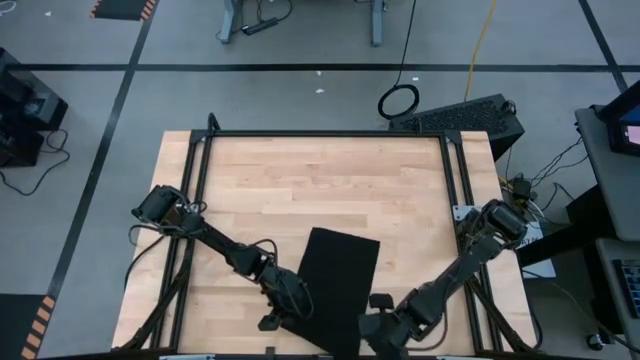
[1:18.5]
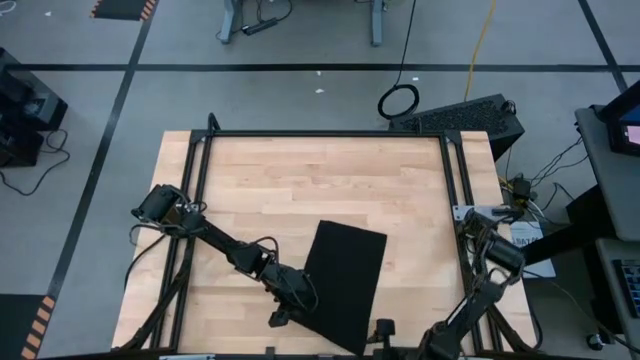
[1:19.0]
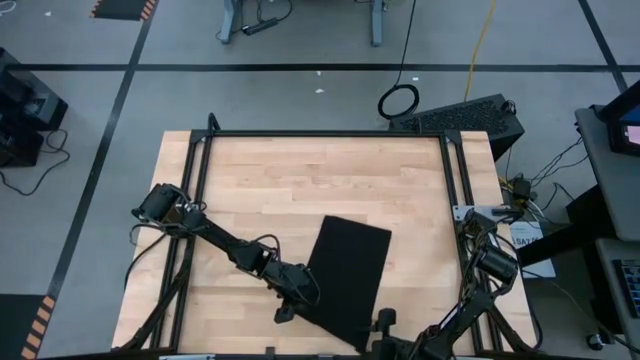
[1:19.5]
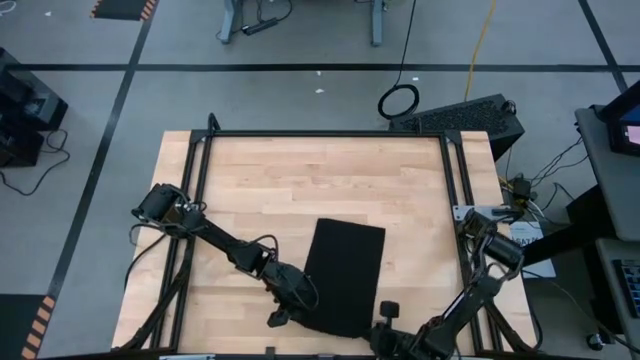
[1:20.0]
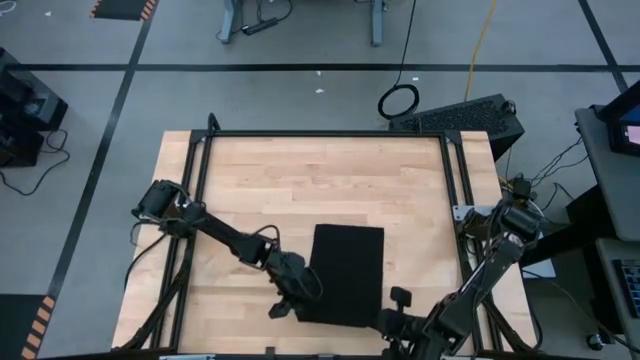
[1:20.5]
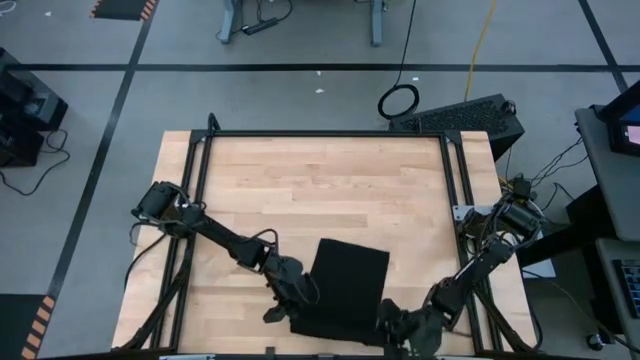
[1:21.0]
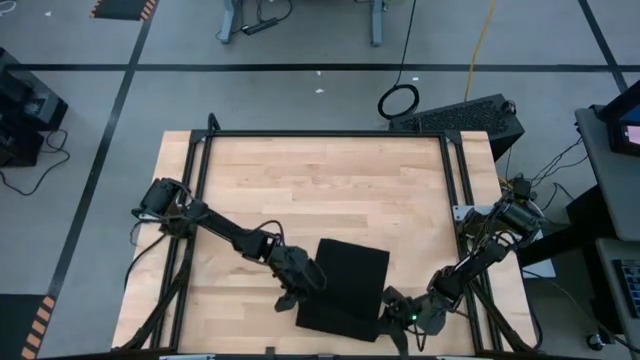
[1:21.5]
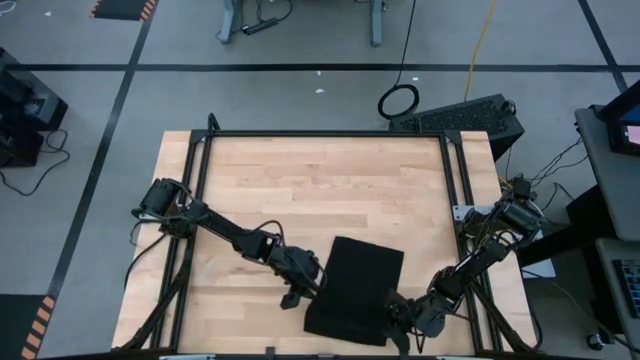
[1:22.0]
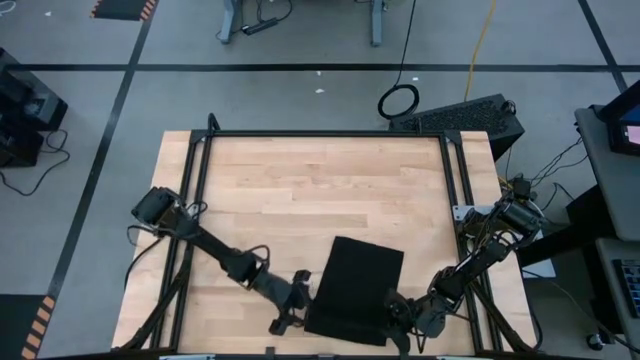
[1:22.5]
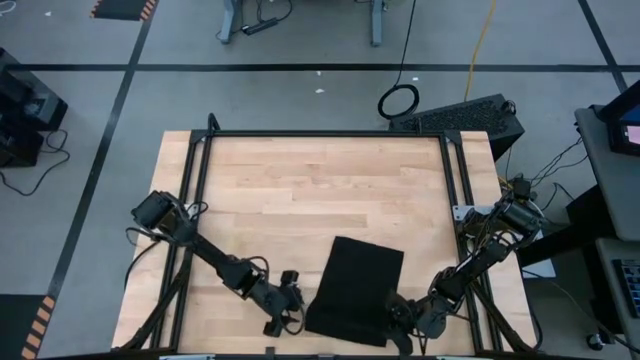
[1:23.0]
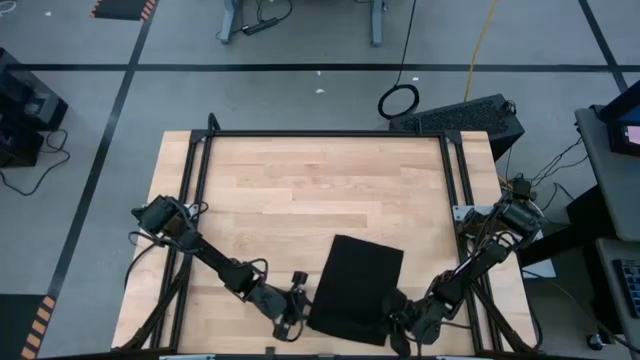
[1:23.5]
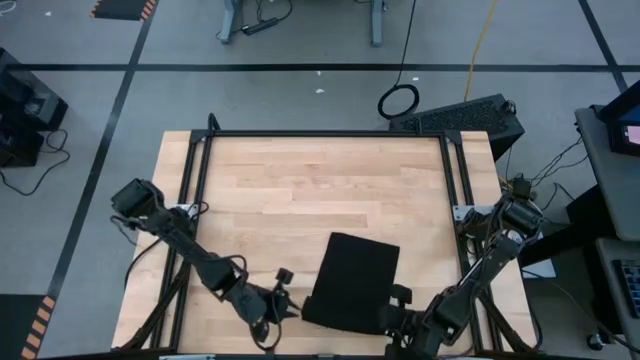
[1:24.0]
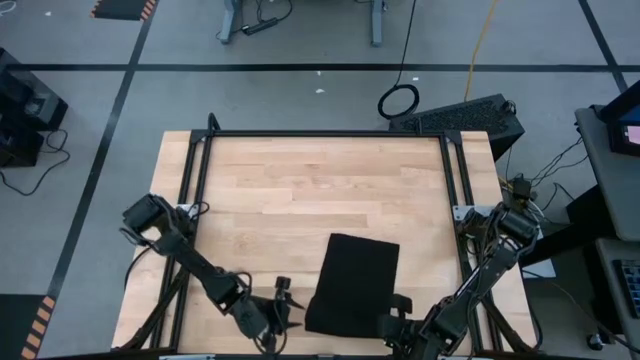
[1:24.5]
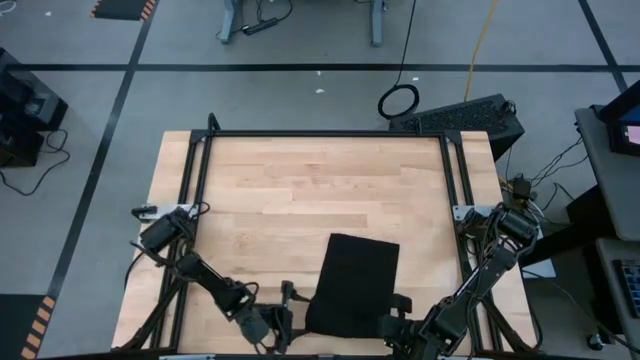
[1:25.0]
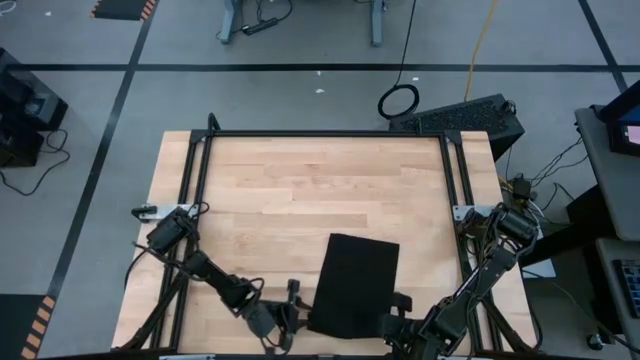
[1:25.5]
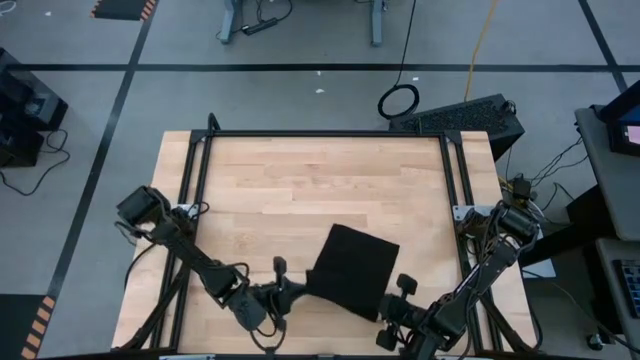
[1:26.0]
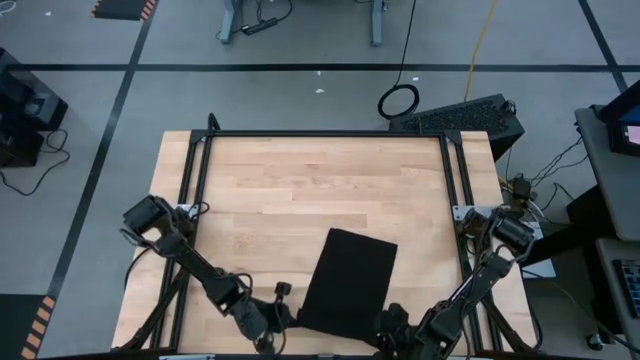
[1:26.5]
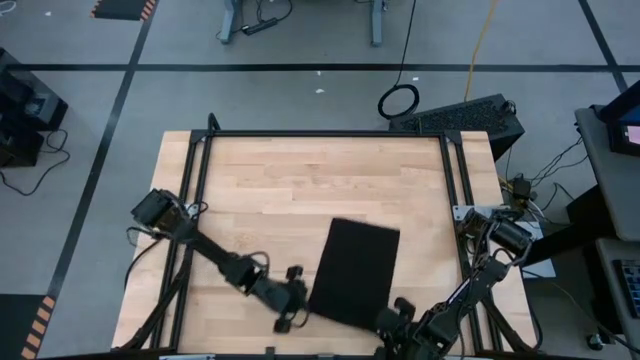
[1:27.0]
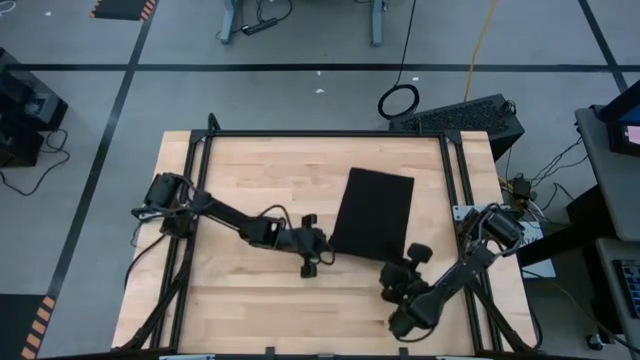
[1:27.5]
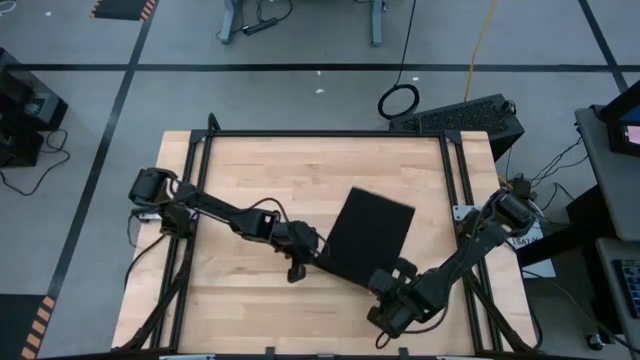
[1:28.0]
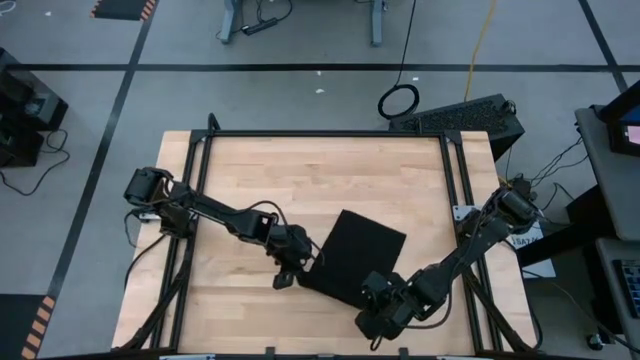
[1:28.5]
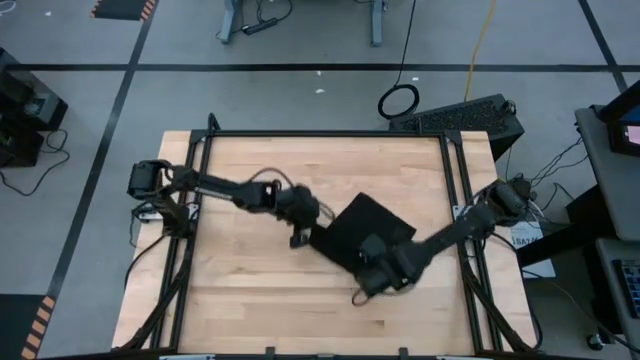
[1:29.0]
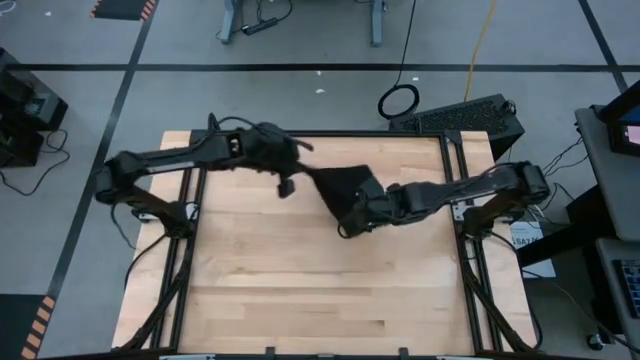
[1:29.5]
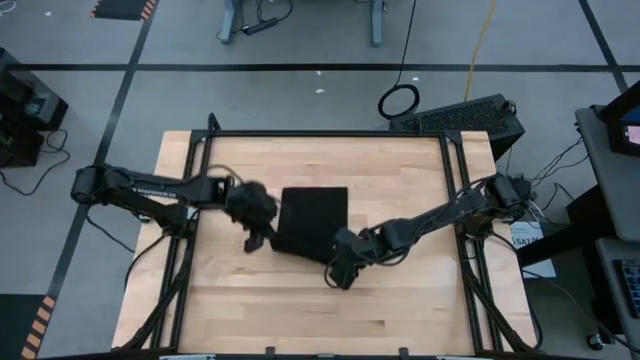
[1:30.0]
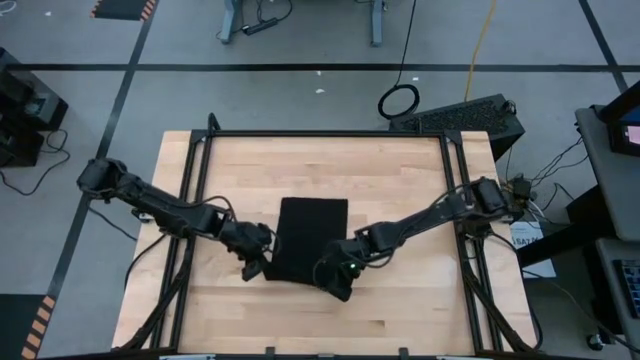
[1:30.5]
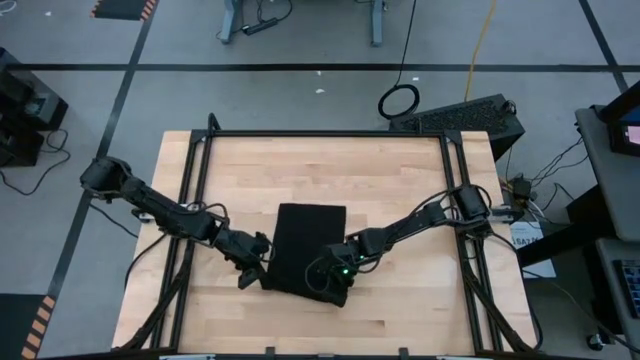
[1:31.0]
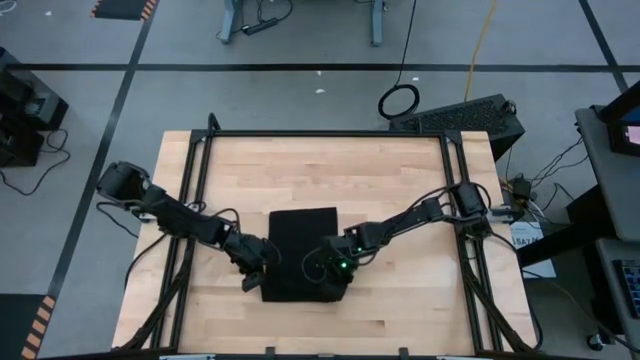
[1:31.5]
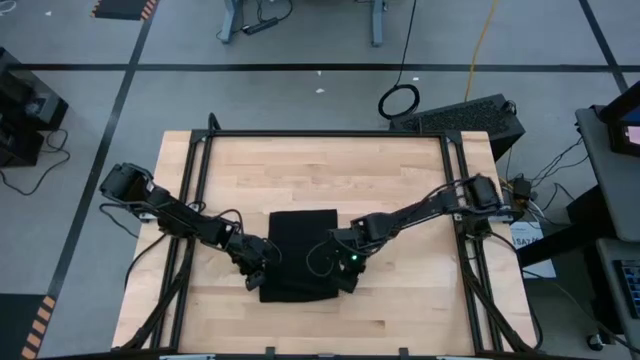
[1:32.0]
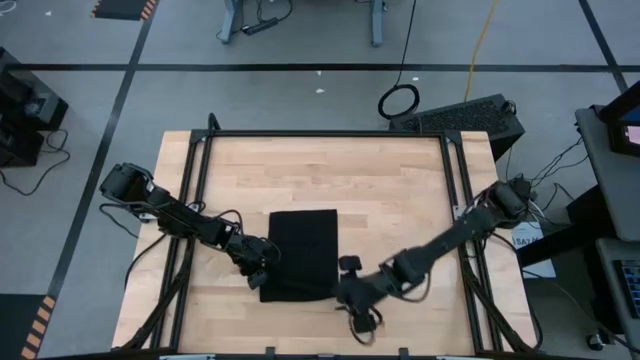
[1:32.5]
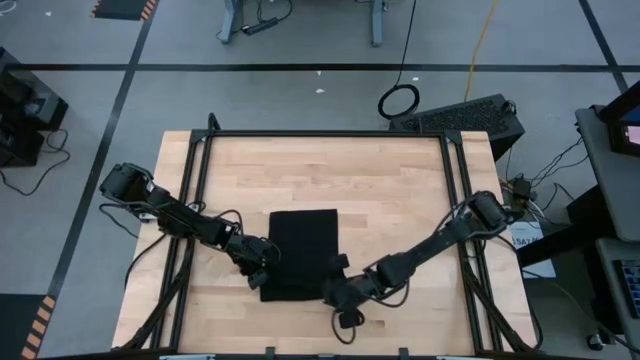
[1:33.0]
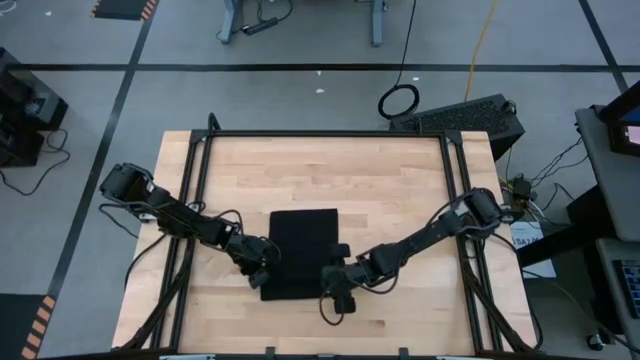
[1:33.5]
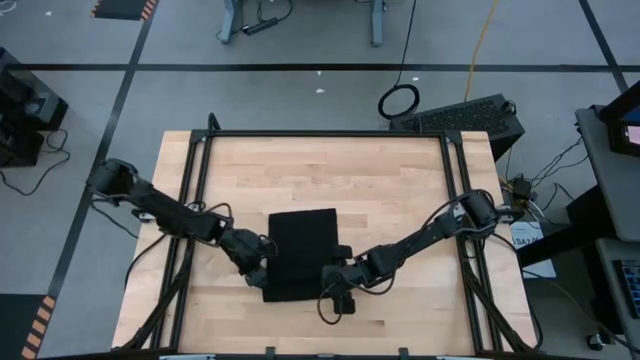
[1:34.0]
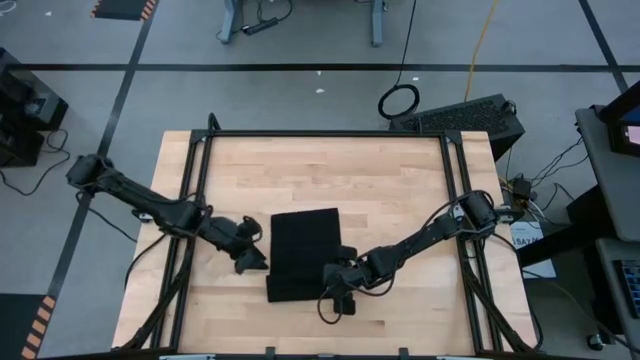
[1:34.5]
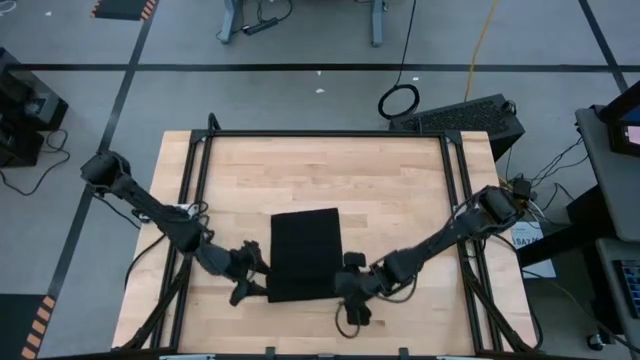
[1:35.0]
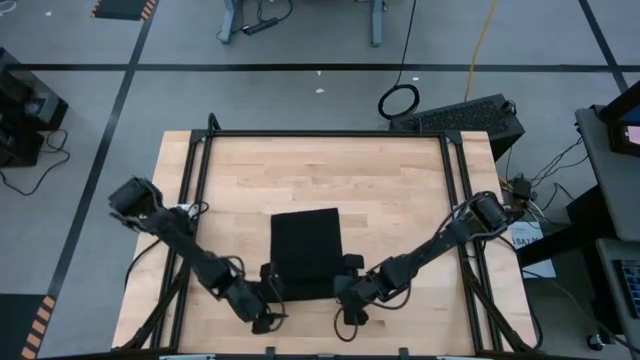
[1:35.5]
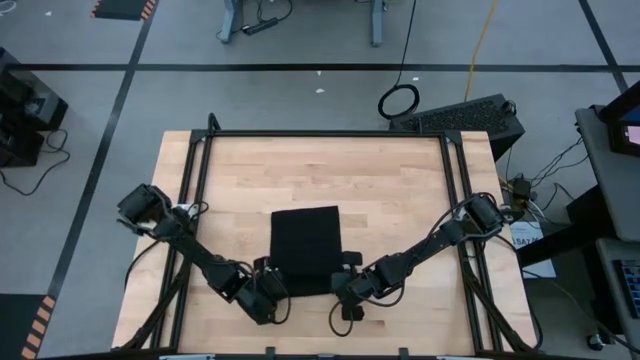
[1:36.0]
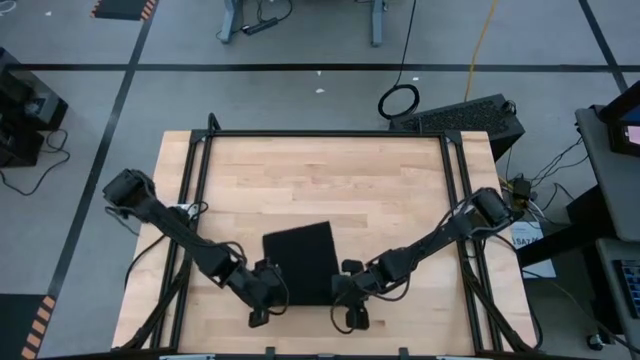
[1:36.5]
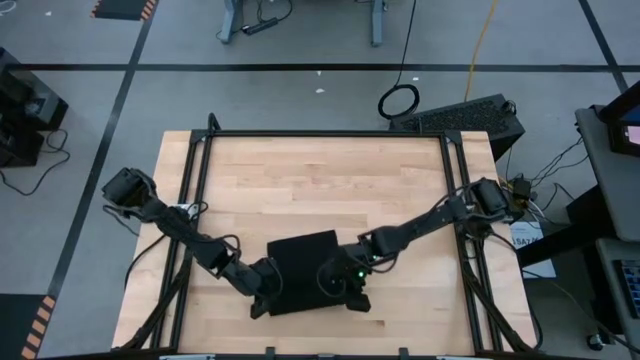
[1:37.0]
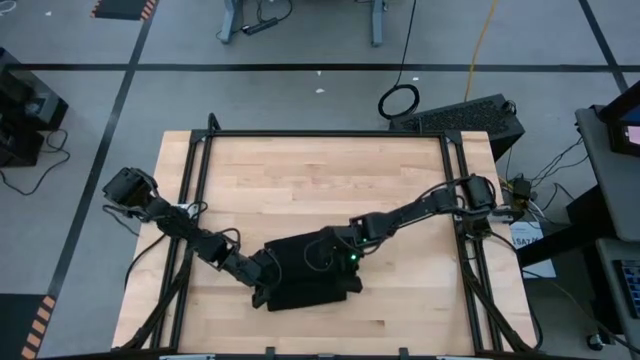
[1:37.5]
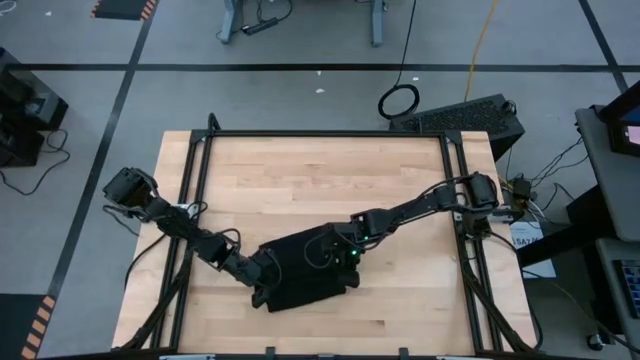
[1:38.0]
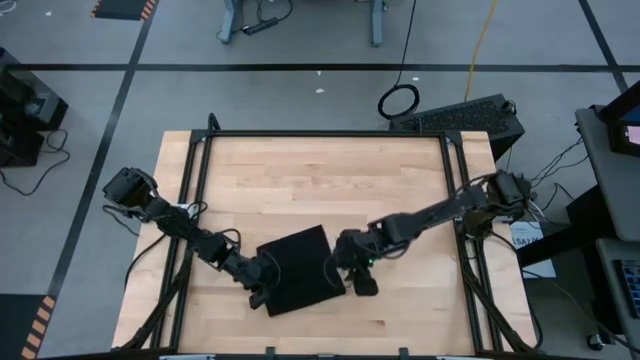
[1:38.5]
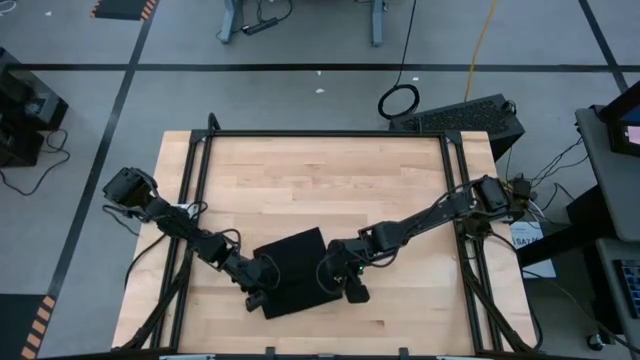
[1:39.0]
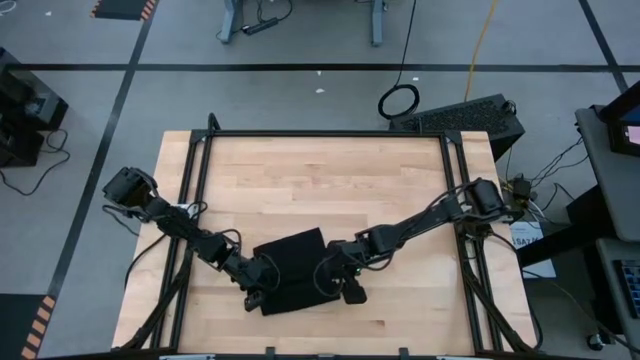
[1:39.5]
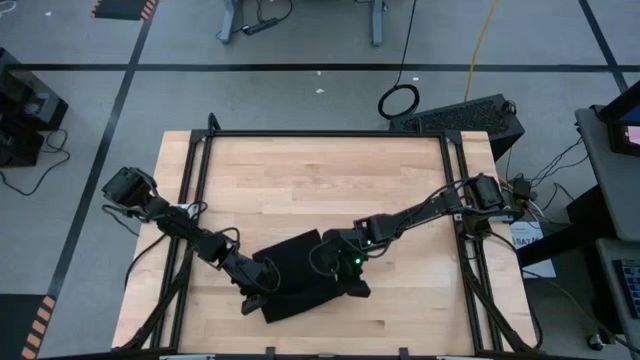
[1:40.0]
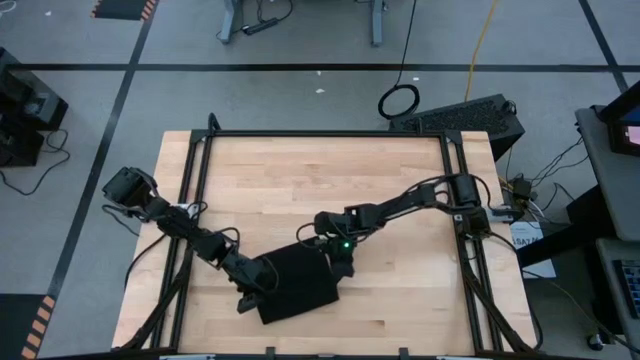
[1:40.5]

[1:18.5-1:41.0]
Task: Roll towel
Roll the black microfiber towel

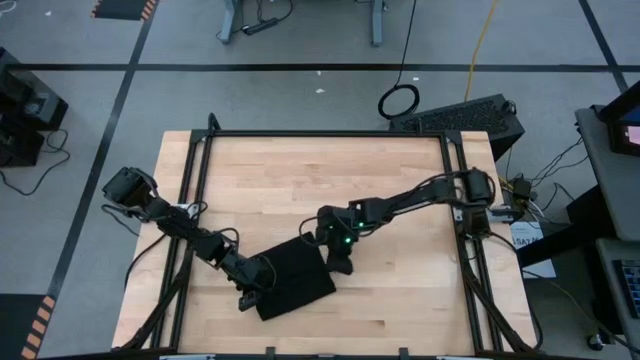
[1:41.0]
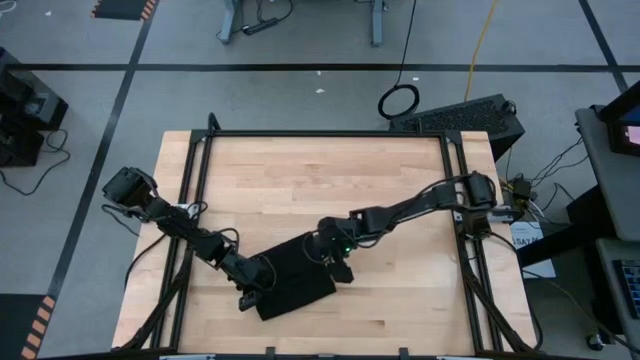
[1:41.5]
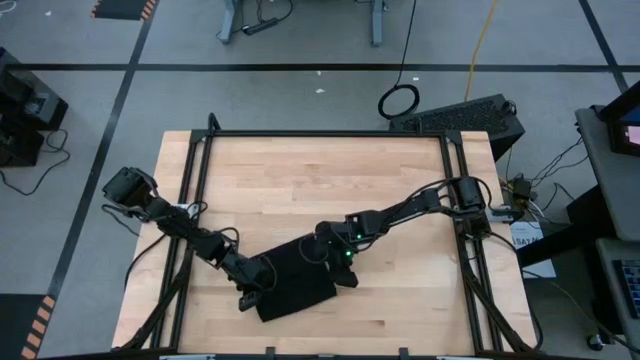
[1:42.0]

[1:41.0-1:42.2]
Roll the black microfiber towel
